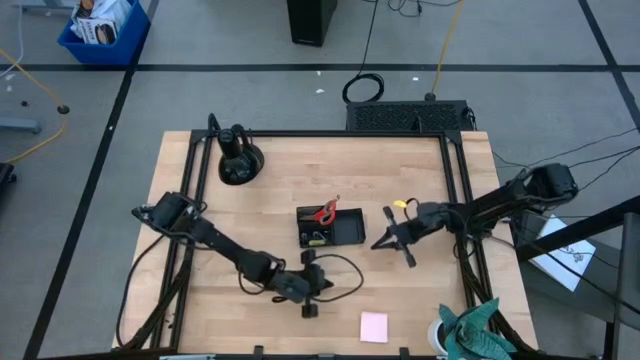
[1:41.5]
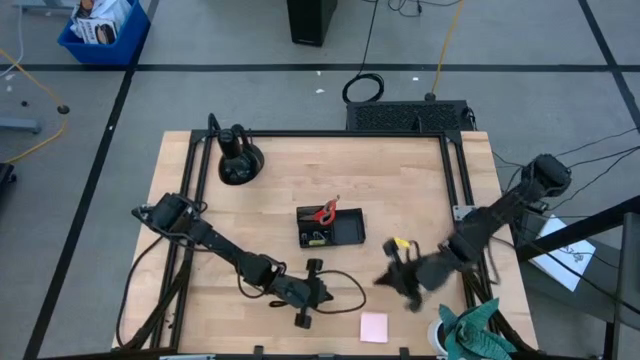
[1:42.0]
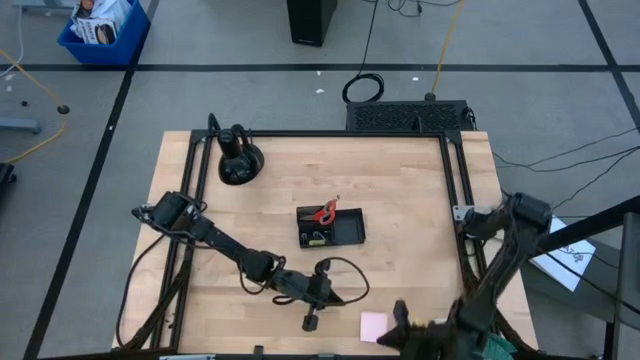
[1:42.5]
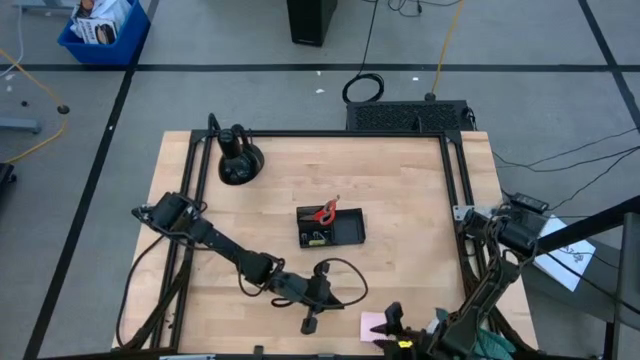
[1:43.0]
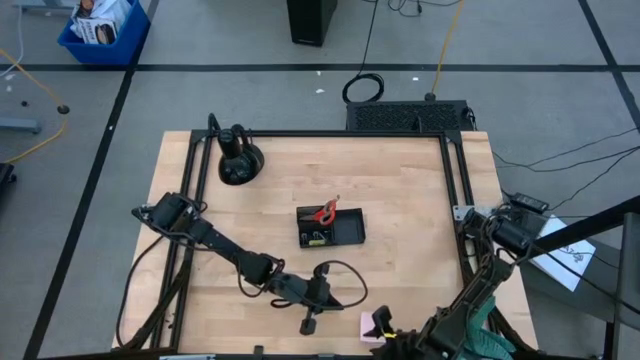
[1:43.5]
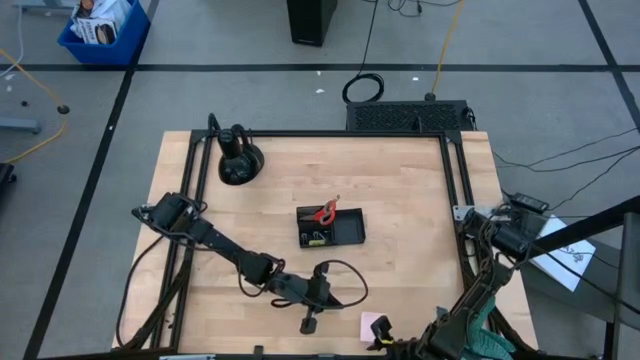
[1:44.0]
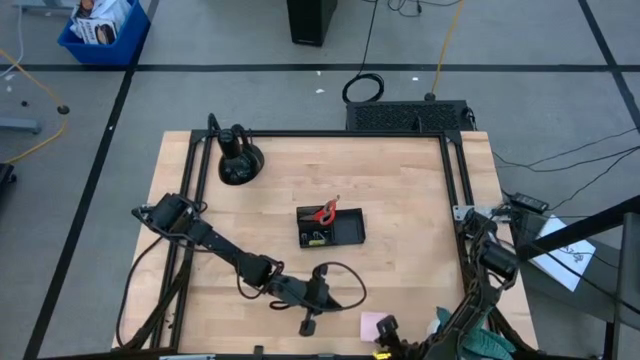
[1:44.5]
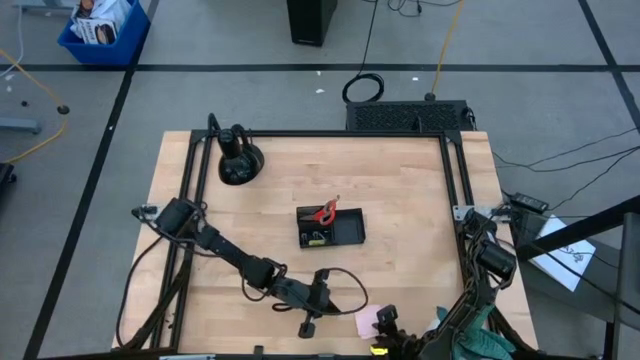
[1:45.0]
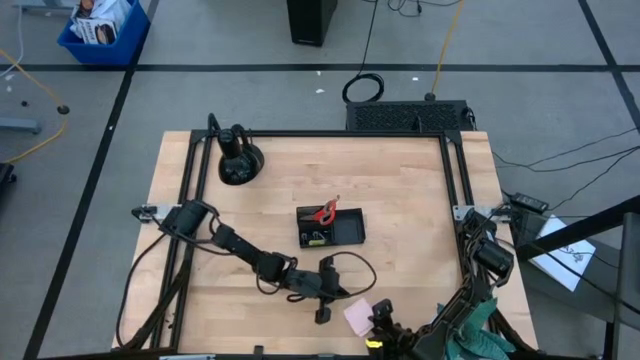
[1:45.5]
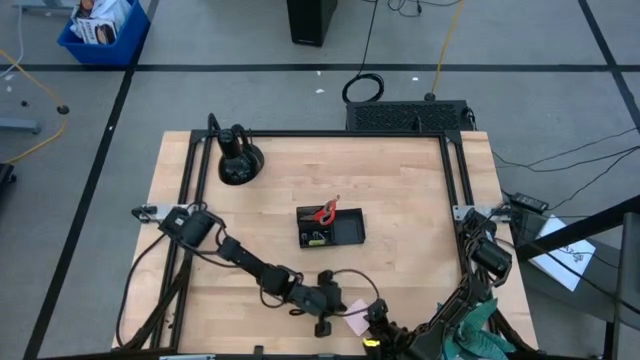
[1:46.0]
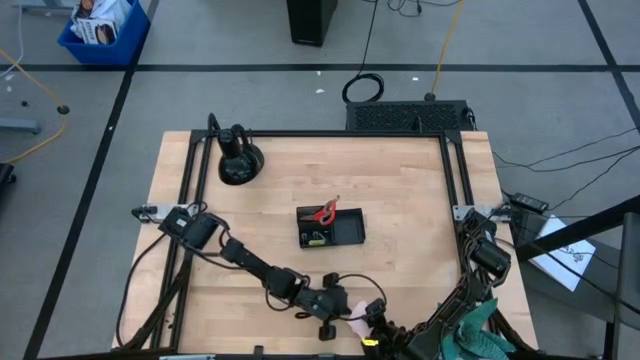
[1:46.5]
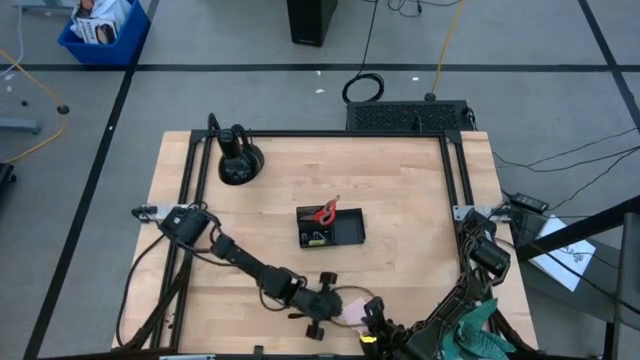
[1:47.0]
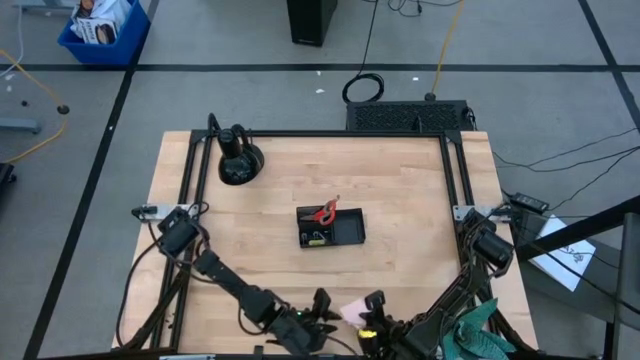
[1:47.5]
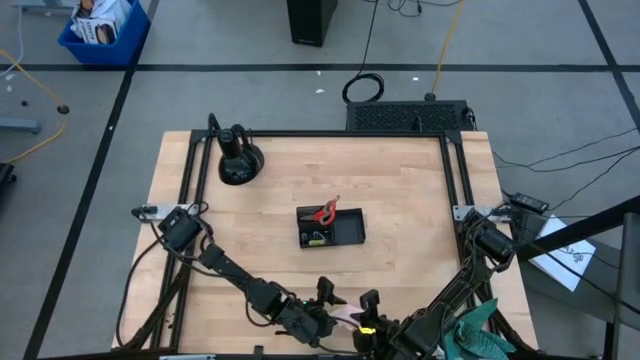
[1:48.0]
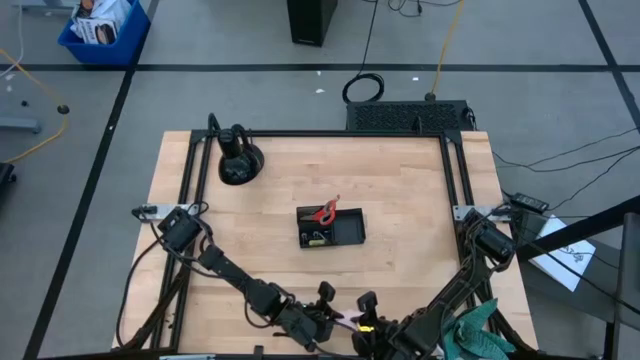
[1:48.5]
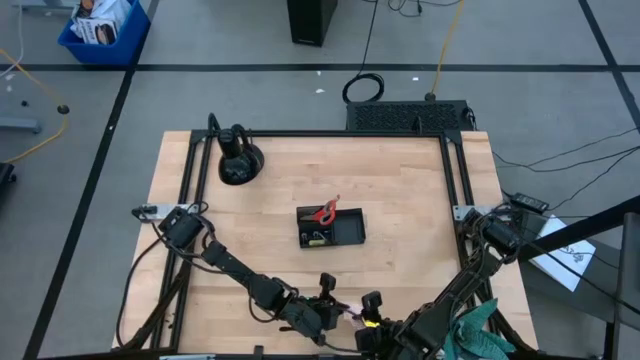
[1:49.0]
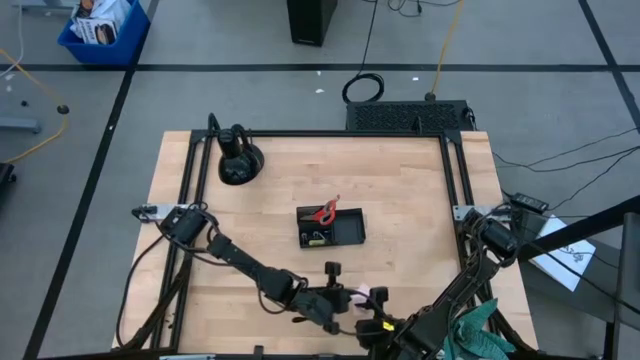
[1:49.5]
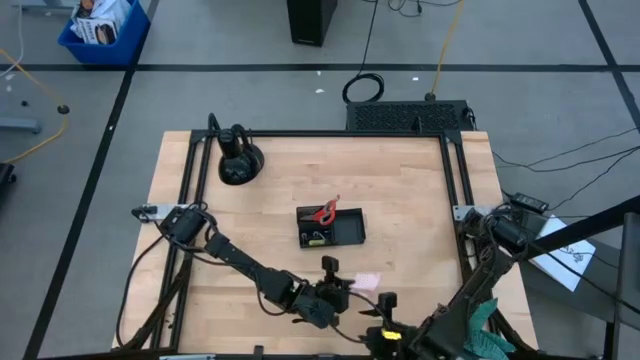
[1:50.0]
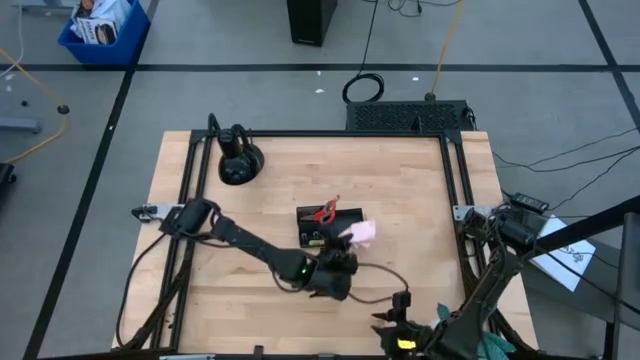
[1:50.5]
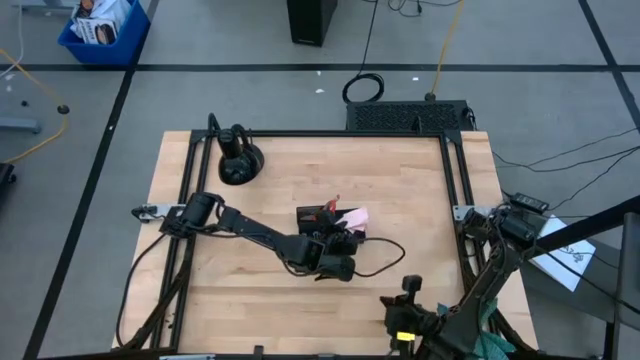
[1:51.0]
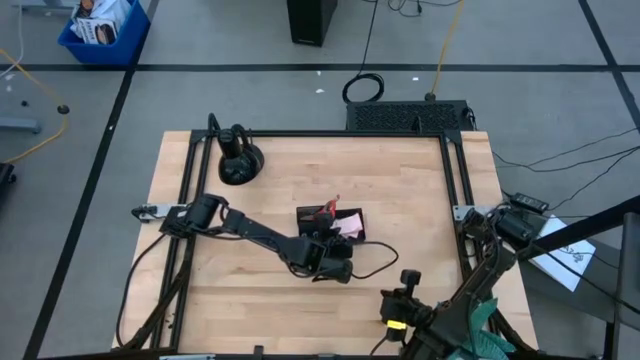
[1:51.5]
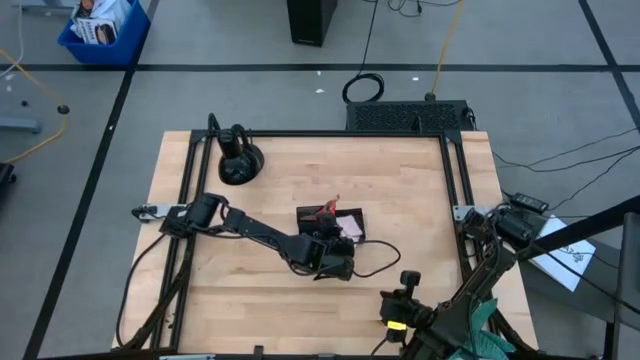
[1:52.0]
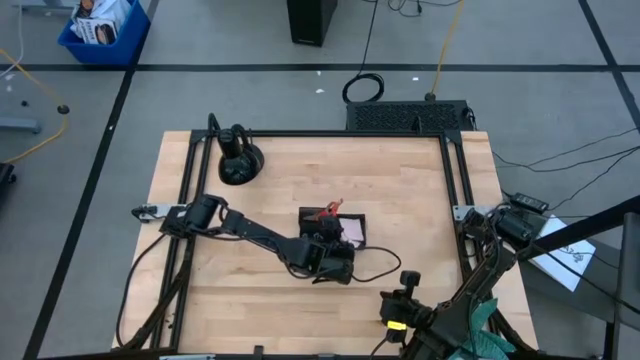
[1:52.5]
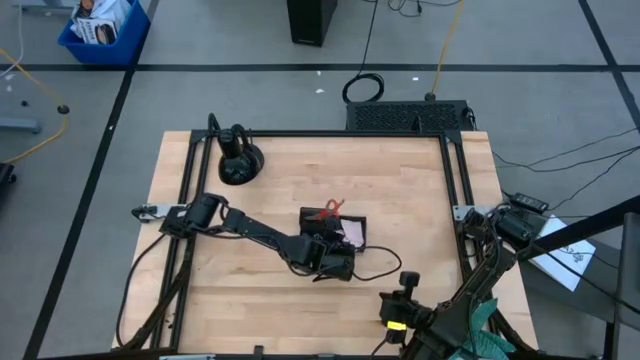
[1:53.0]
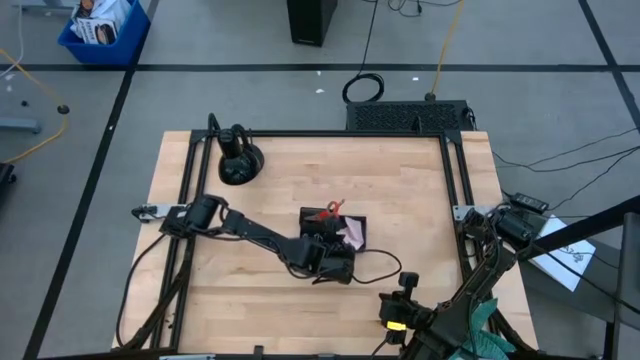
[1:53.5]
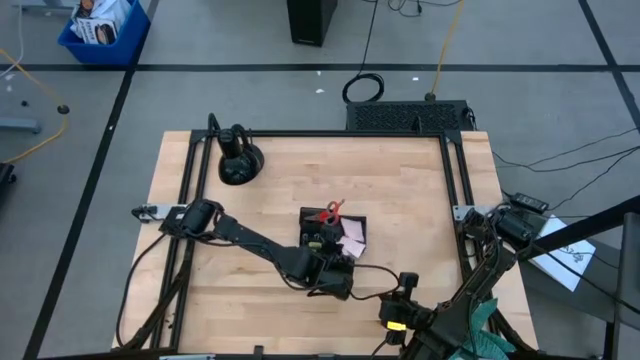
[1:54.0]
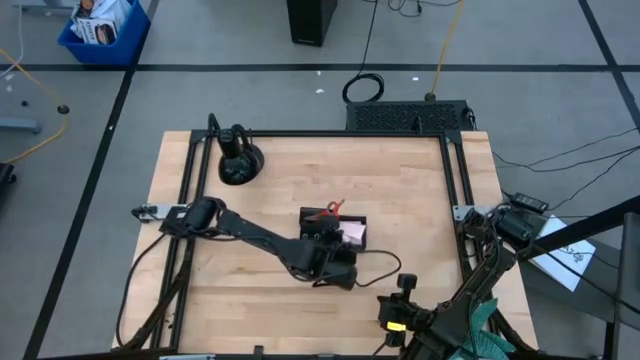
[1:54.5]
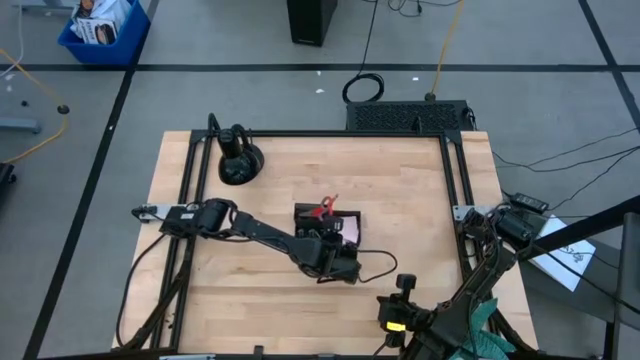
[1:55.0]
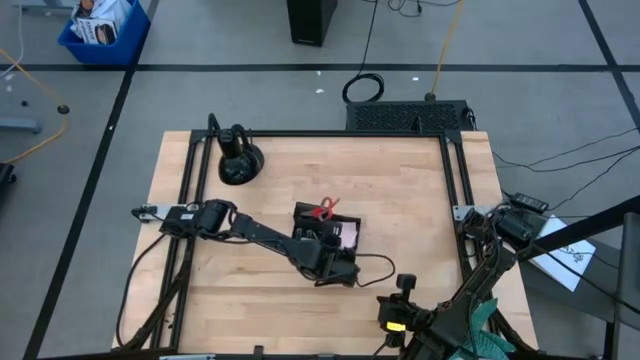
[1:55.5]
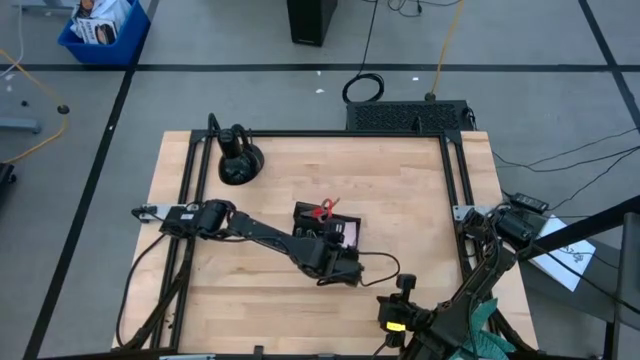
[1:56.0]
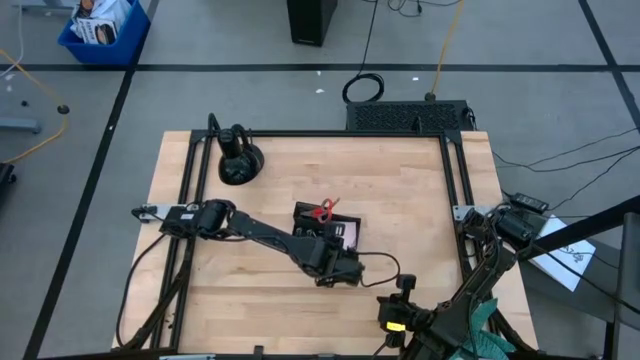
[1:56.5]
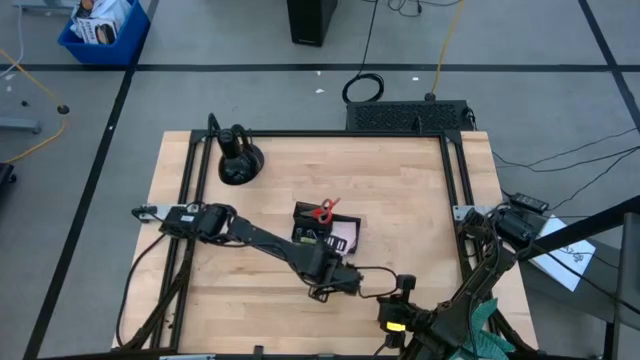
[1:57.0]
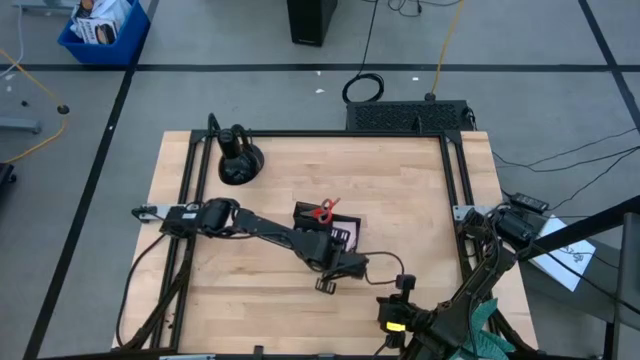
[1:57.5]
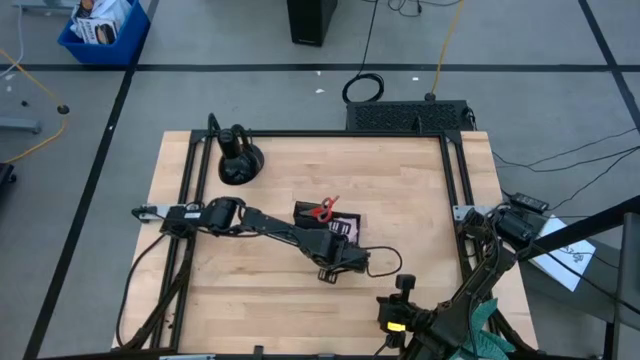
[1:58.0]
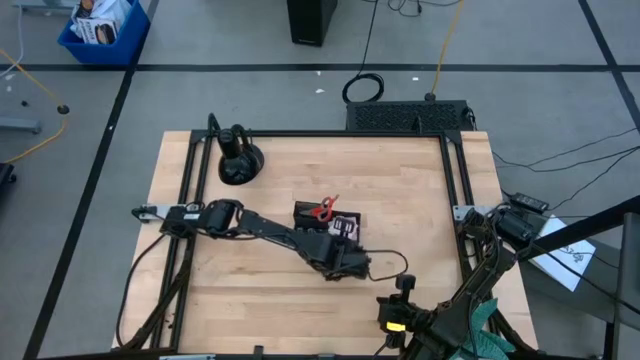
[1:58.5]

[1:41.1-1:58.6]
Task: Pick and place office supplies into organizer
Put the pink sticky notes into the black desk organizer

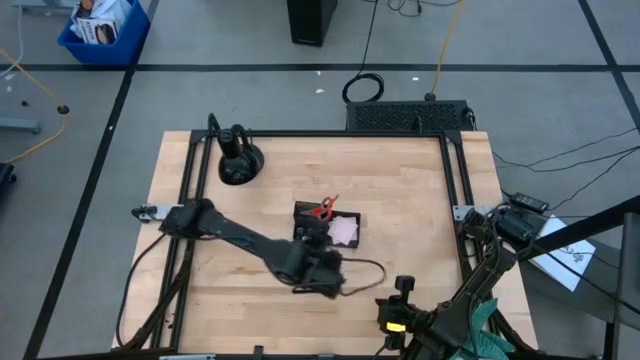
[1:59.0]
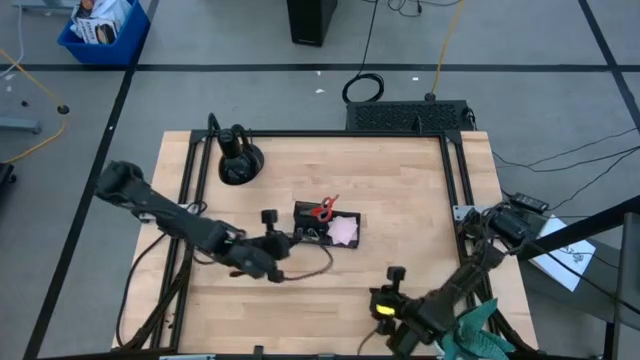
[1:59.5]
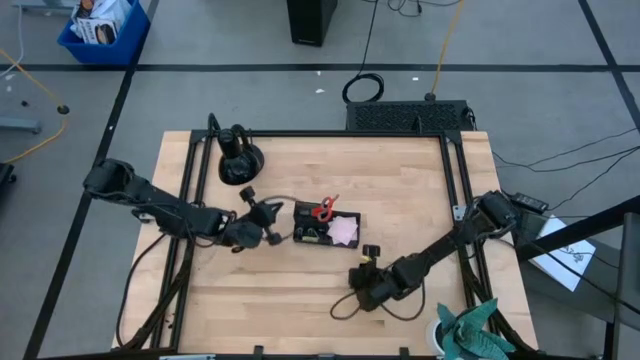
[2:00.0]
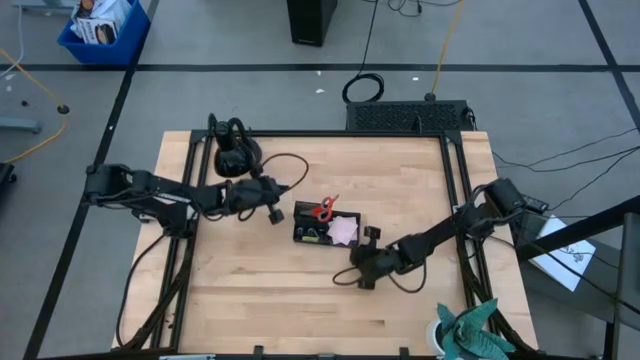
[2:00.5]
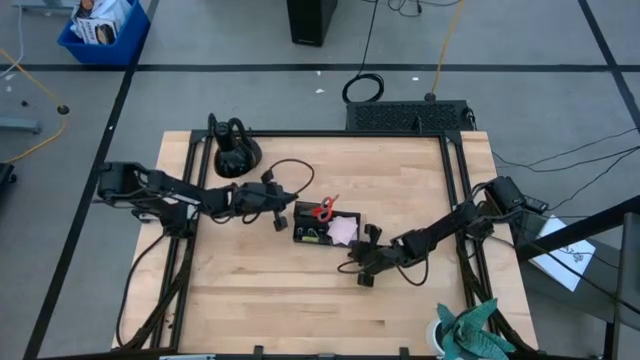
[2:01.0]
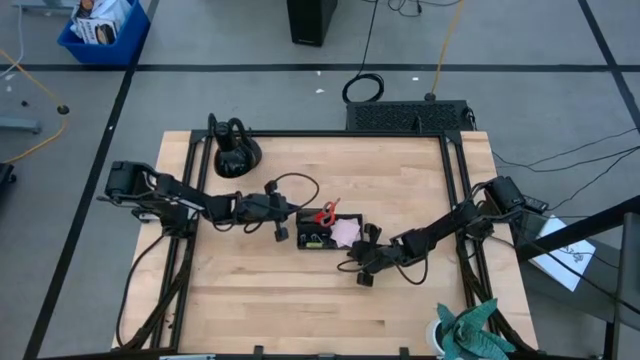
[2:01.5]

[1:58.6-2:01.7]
Adjust the black desk organizer

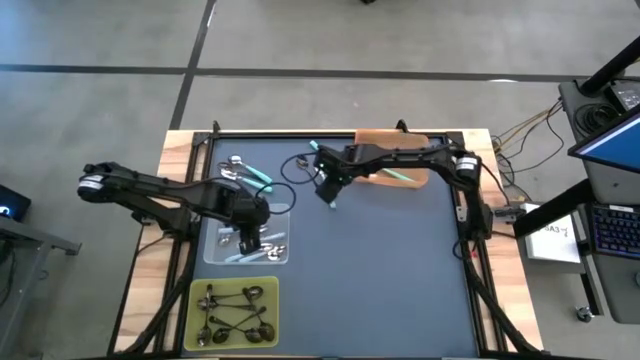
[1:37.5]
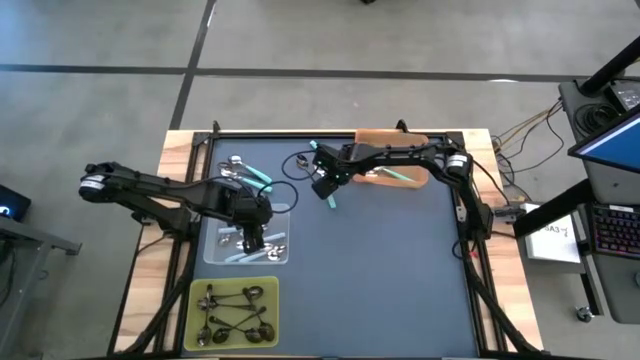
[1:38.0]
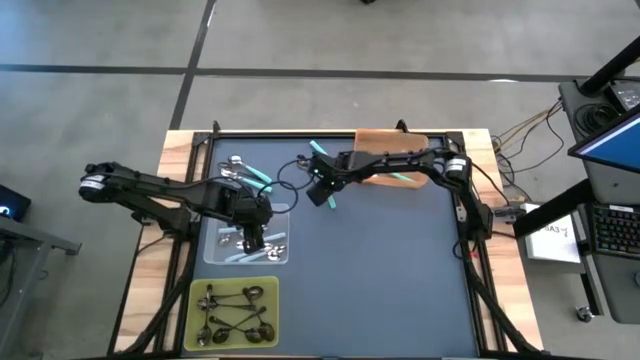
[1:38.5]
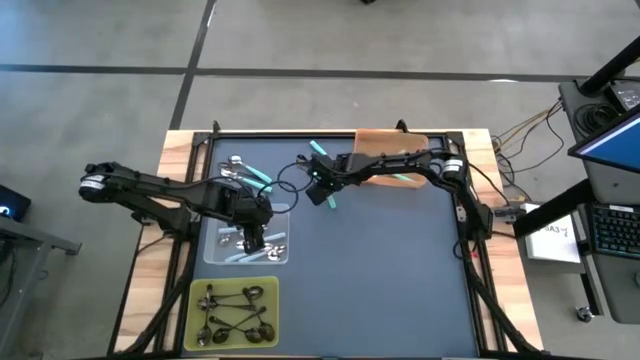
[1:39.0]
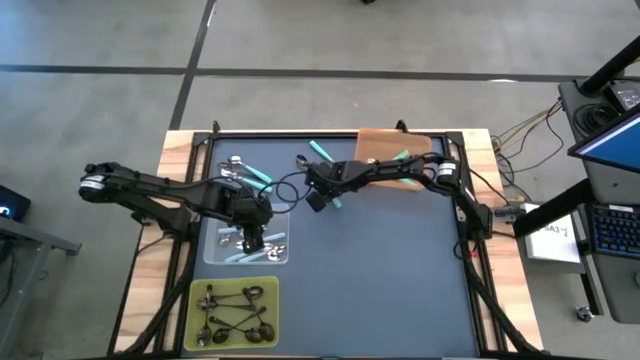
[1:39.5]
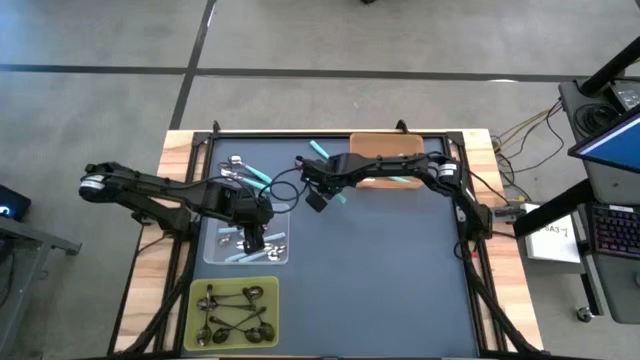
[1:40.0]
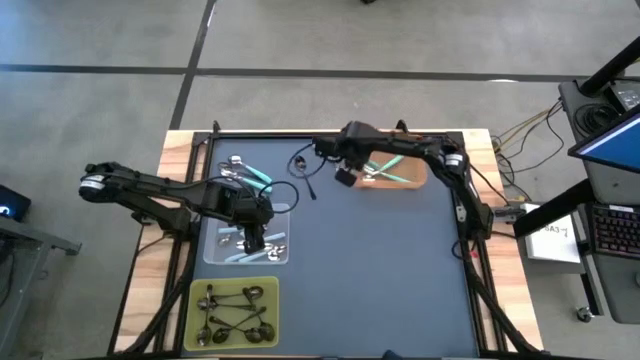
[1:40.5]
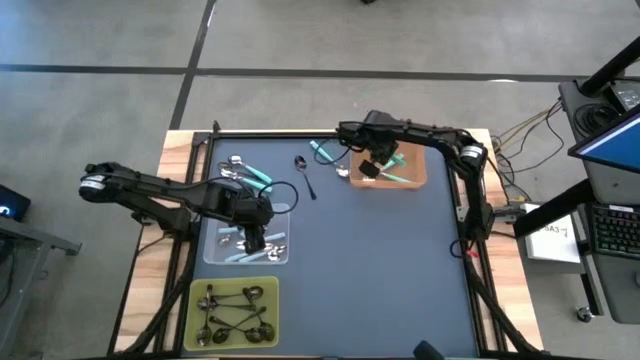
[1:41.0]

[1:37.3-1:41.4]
Task: Sort silverware by color (type)
Put the green spoon into the orange bin
